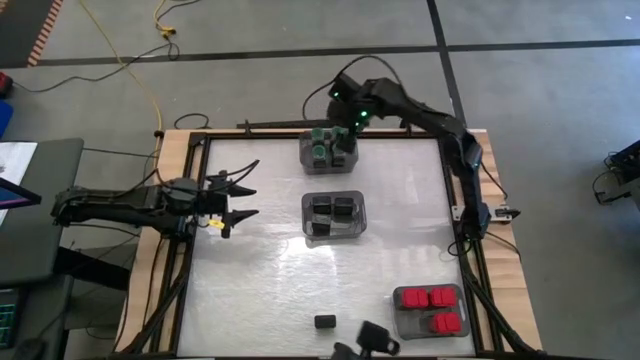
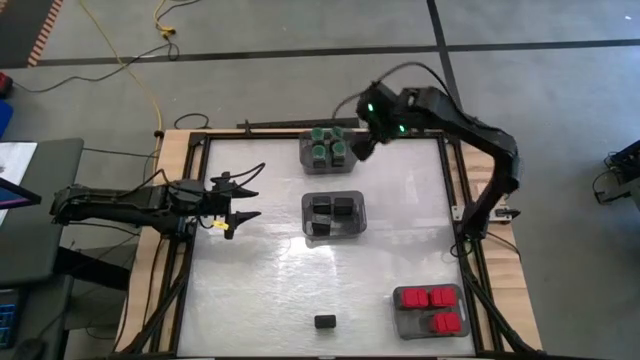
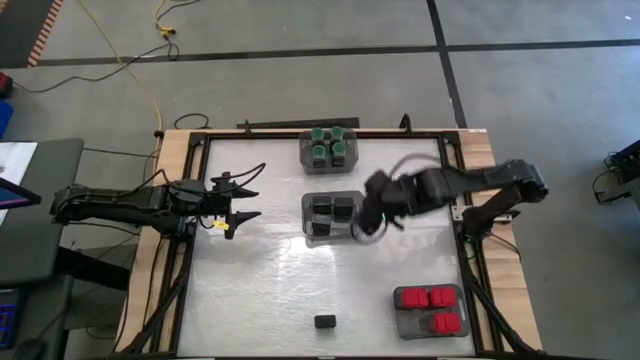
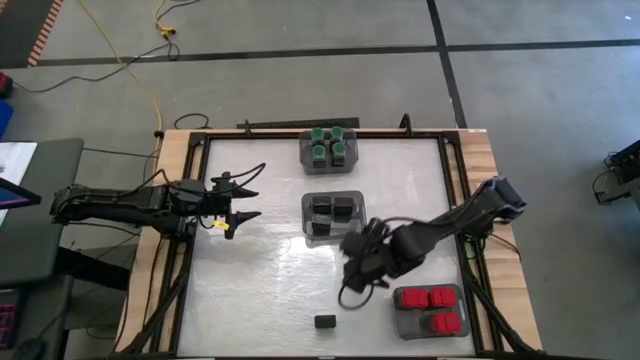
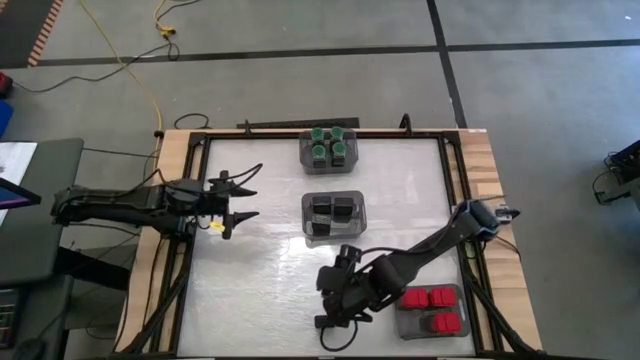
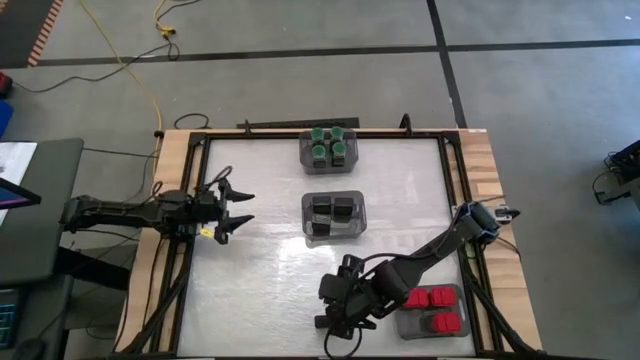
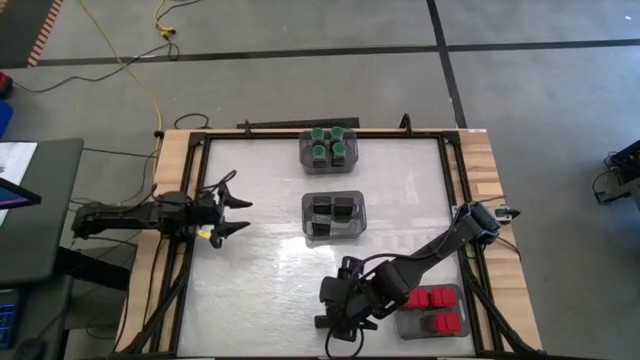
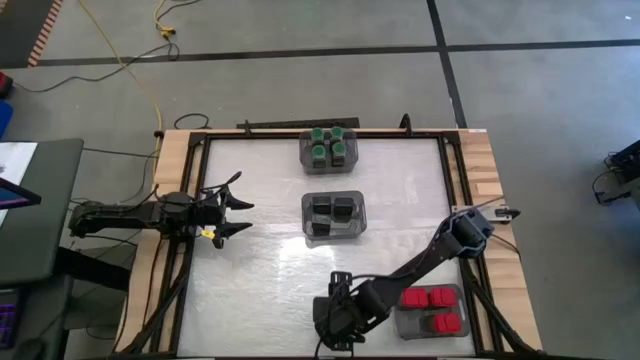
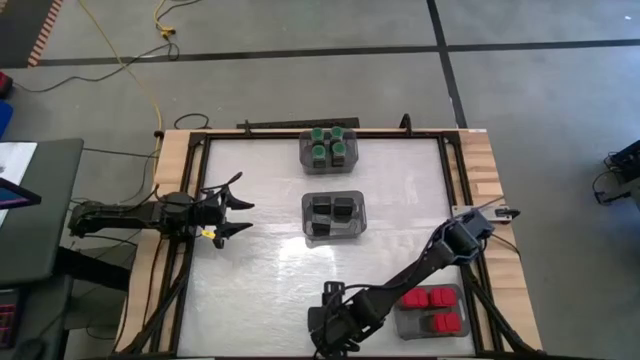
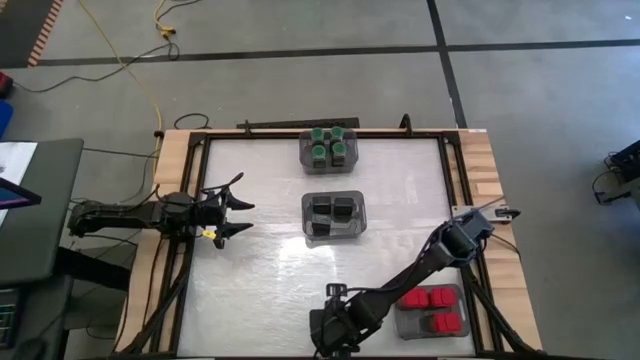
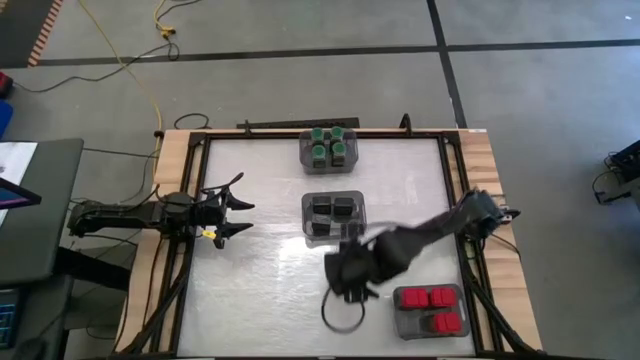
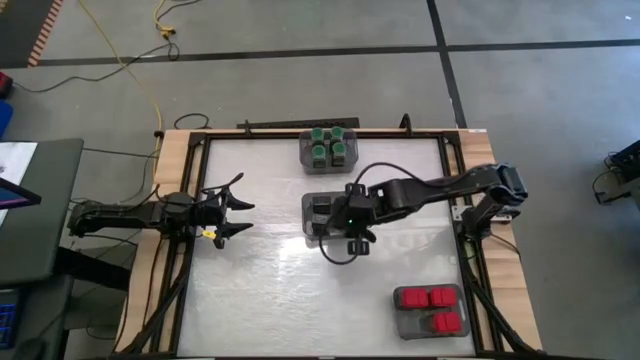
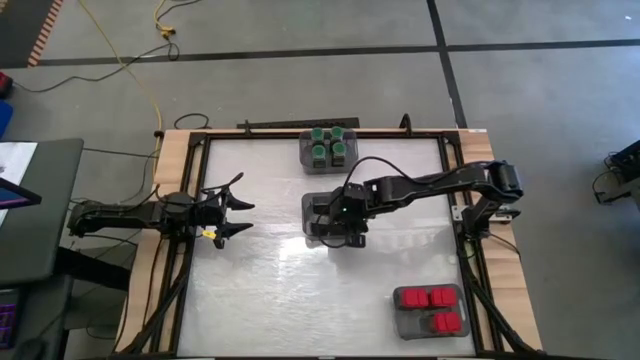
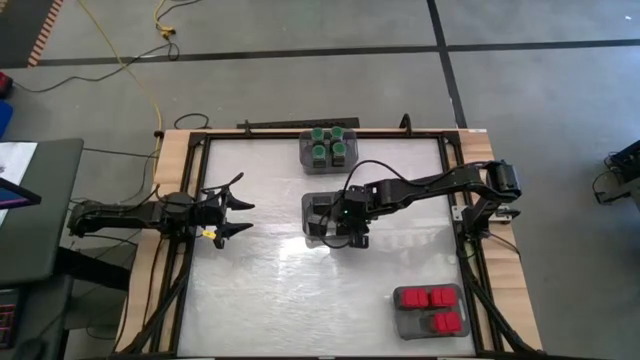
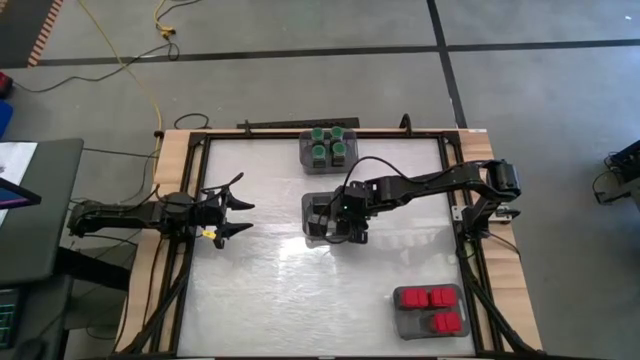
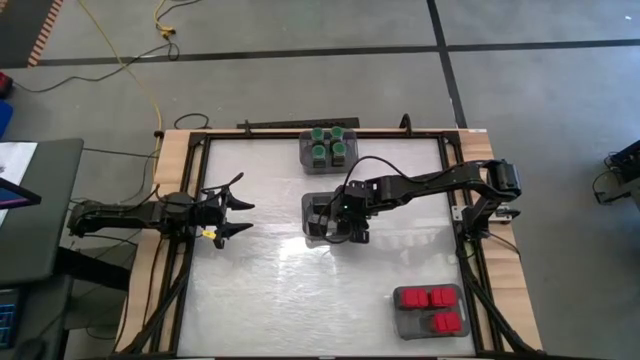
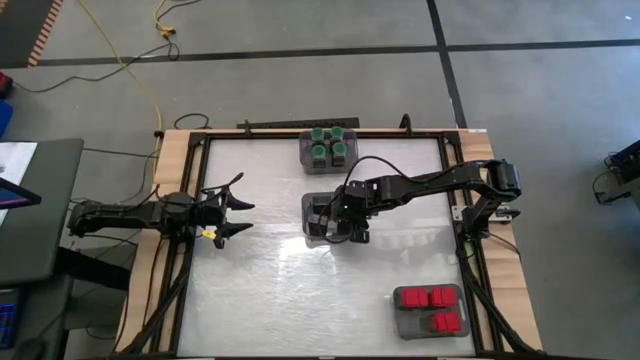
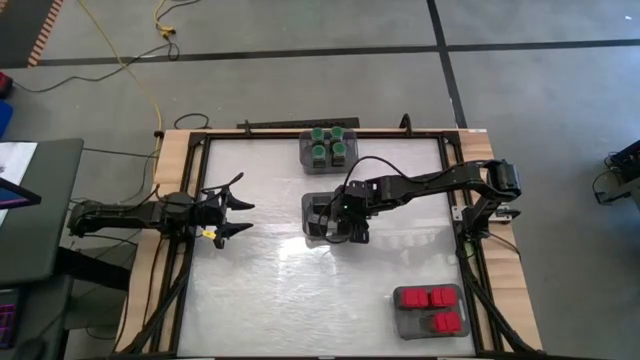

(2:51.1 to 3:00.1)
Task: Sort spices by type
Put the black seasoning can into the middle left black bin

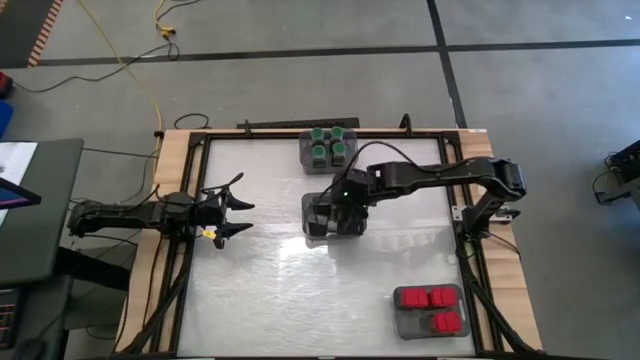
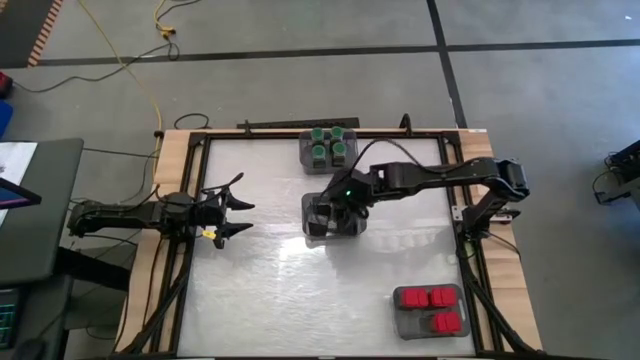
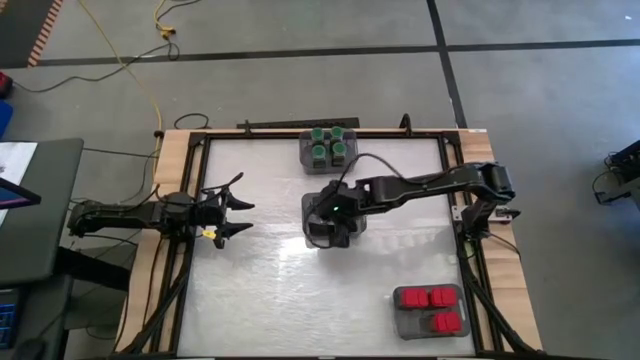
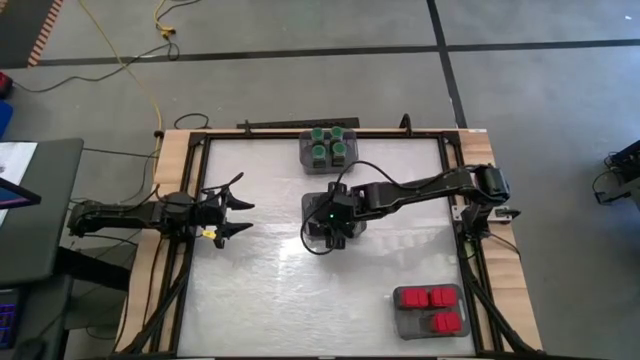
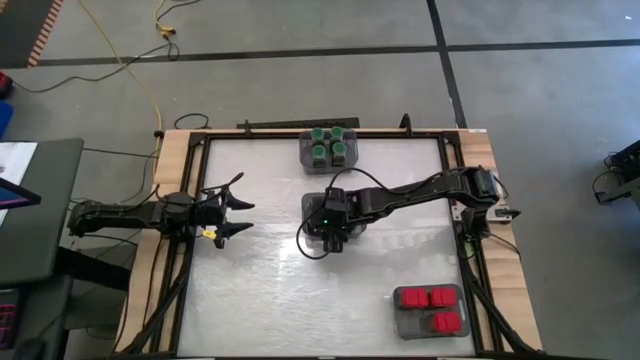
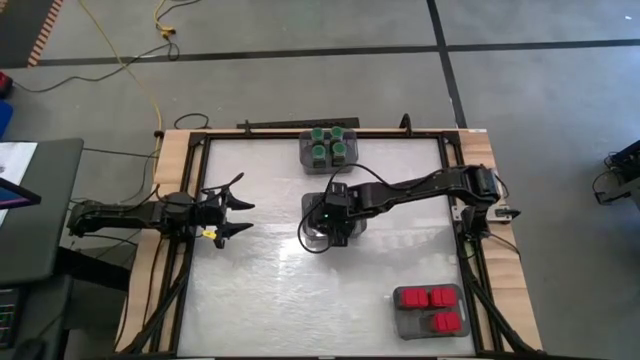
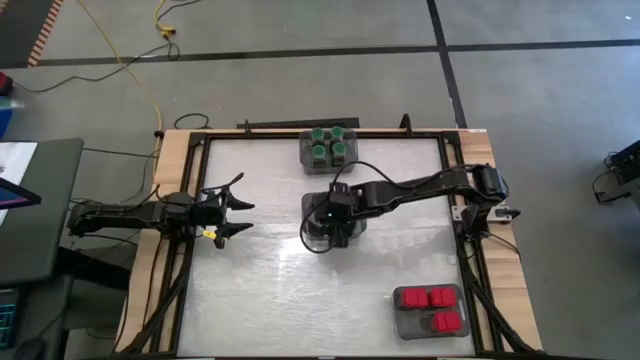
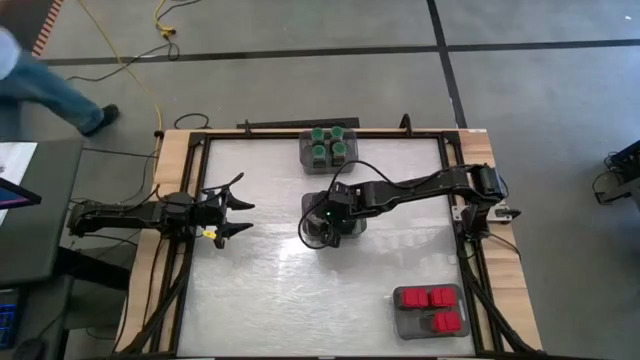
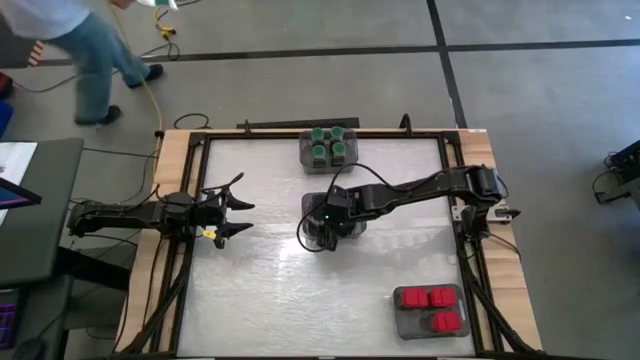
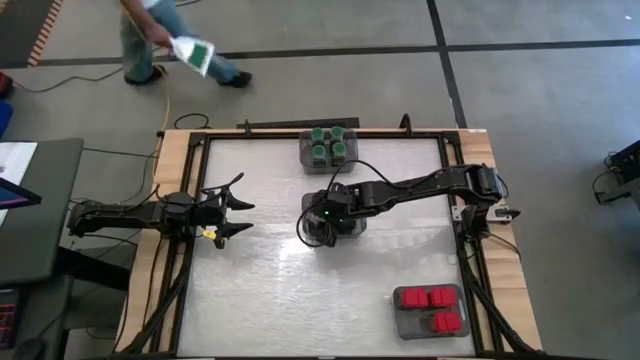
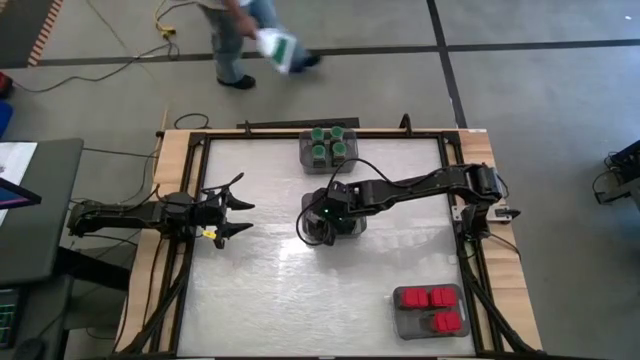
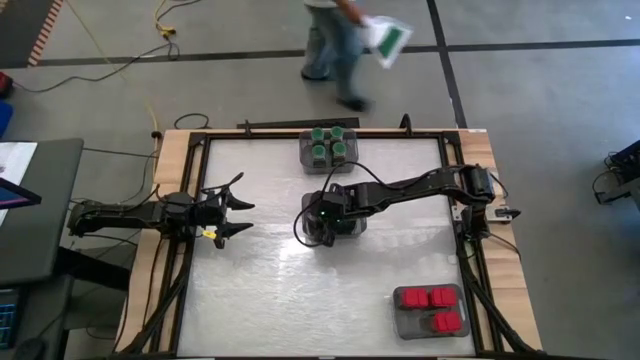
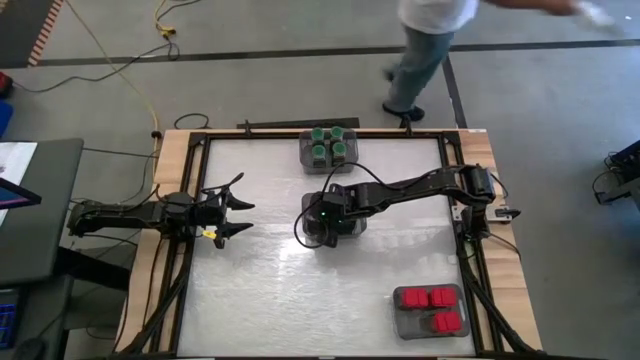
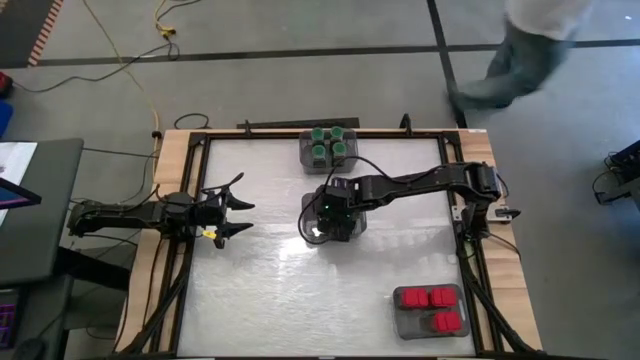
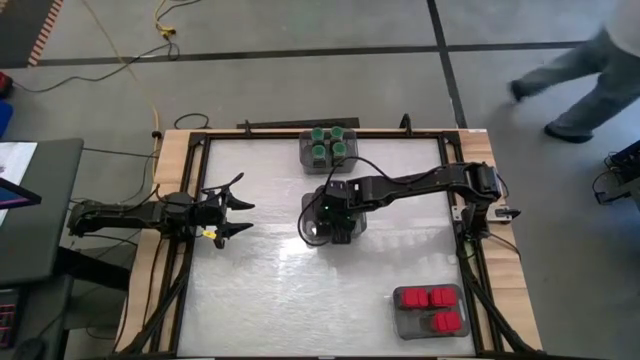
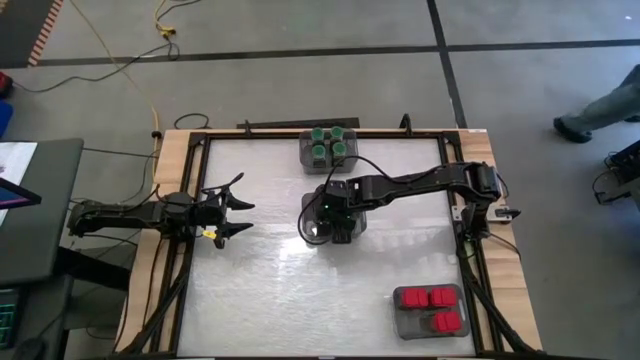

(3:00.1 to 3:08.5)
Adjust the black seasoning can in the middle left black bin

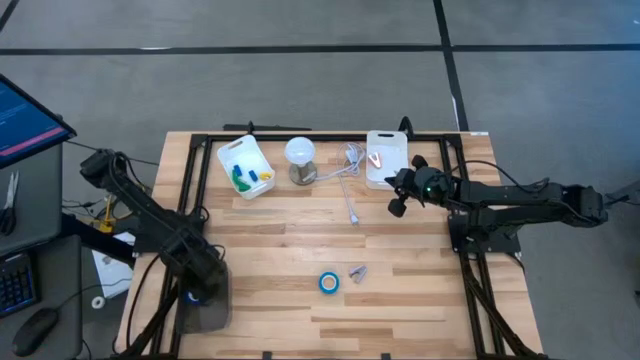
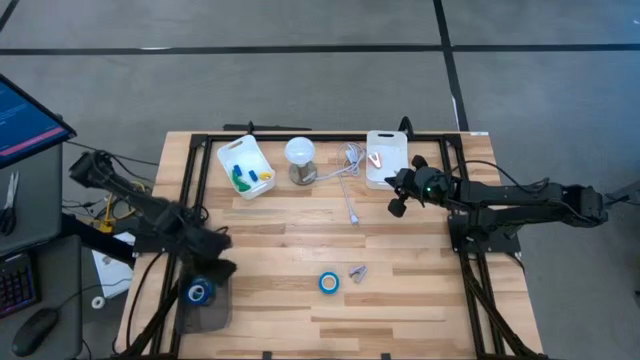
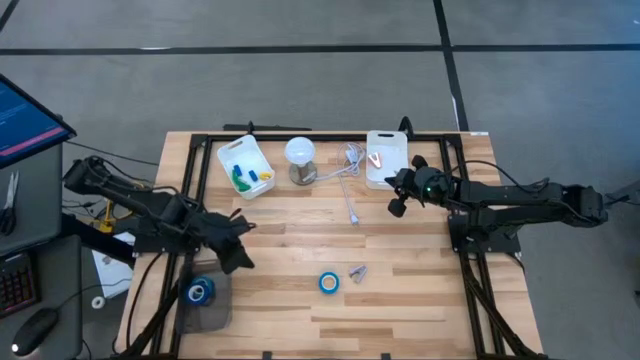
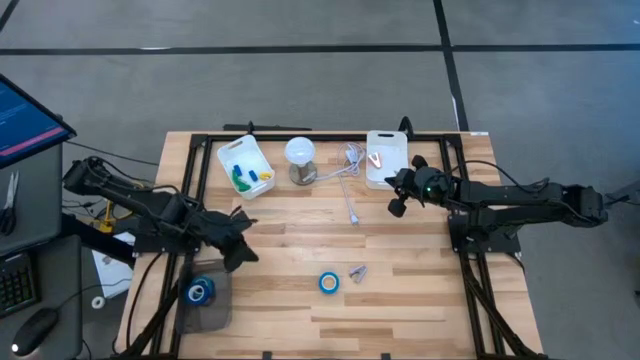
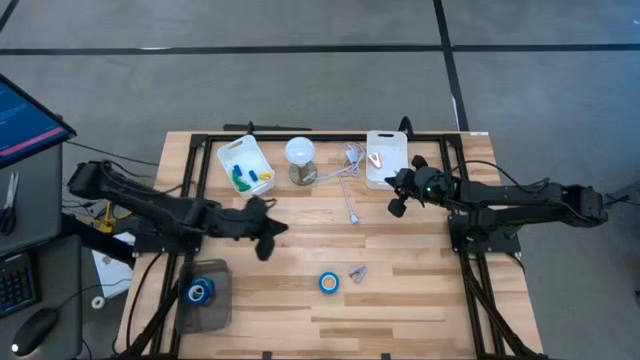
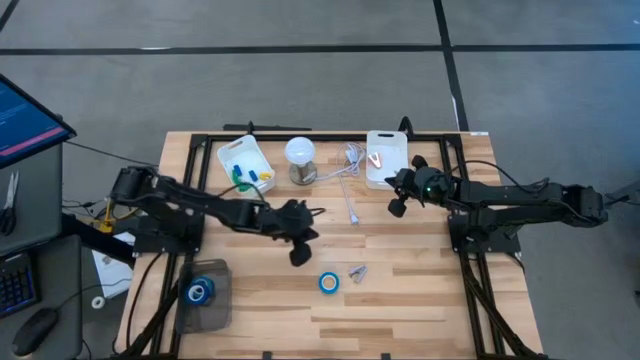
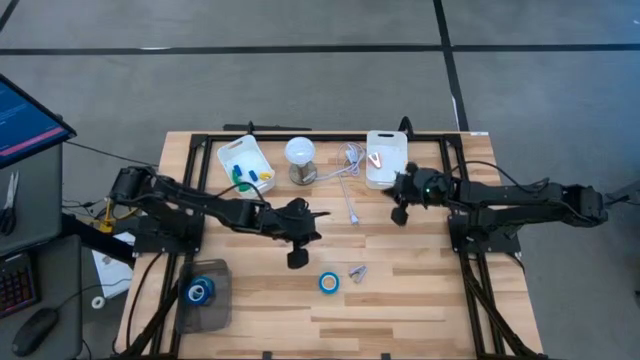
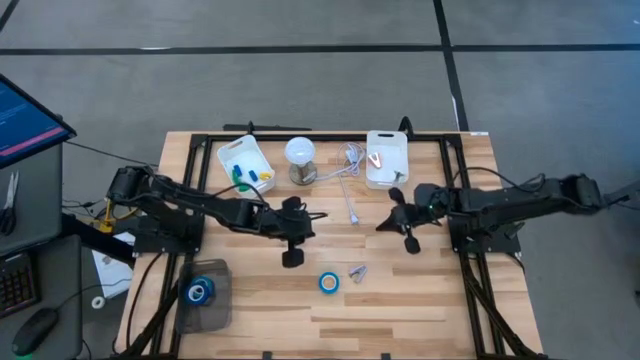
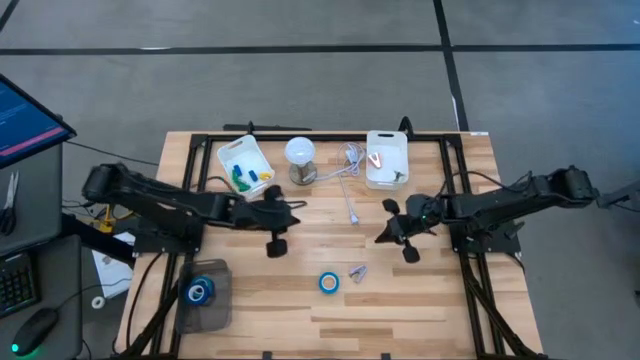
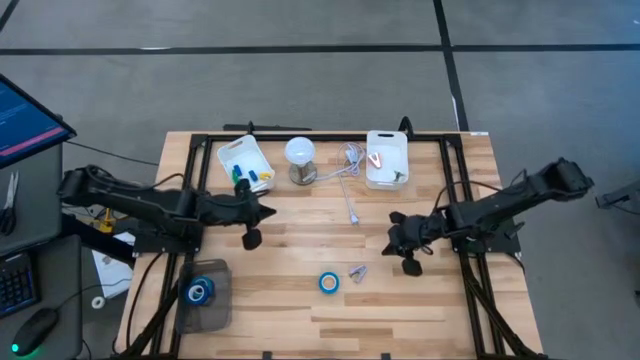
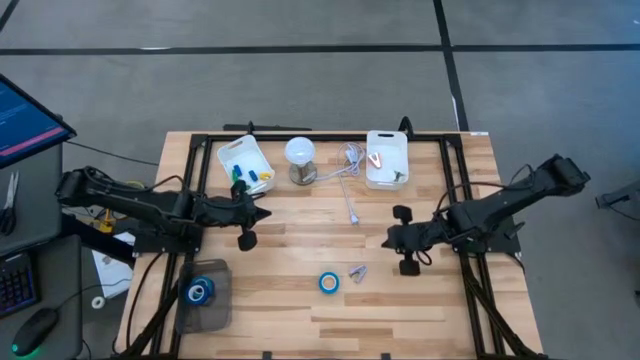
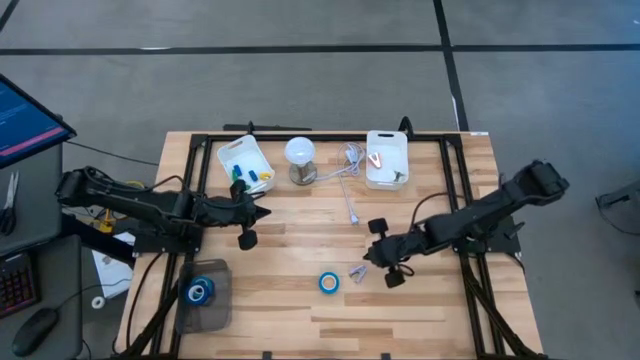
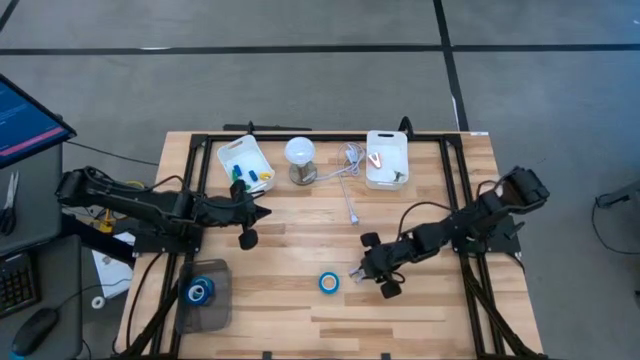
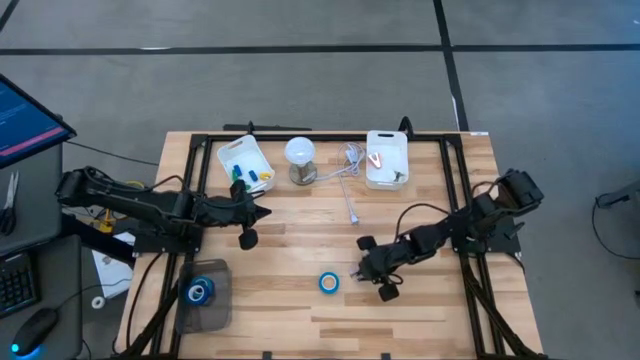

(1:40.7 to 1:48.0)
Task: Pick and place Stapler, Stapler remover, tape
Put the purple staple remover into the right white bin
